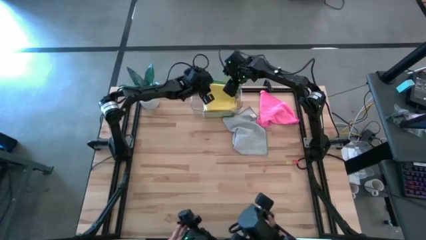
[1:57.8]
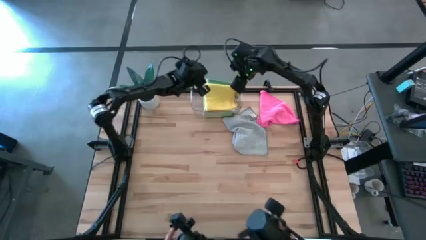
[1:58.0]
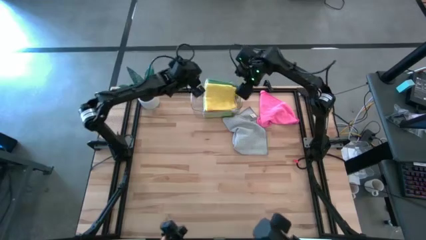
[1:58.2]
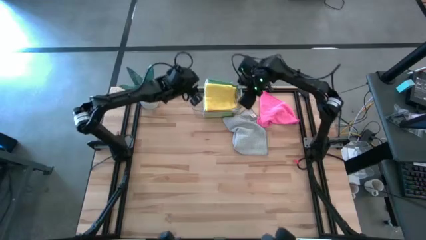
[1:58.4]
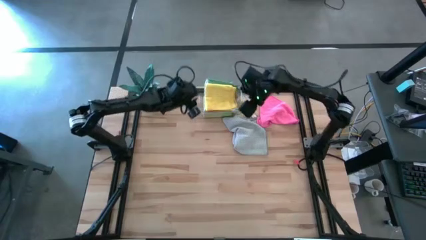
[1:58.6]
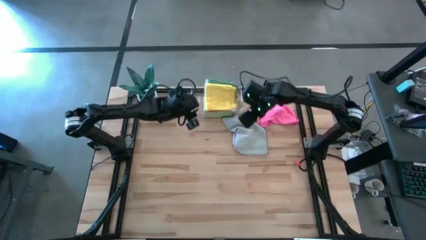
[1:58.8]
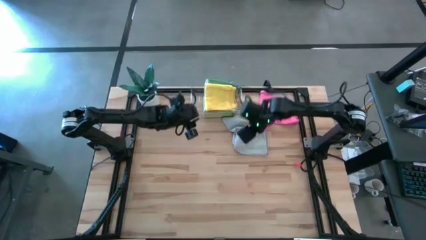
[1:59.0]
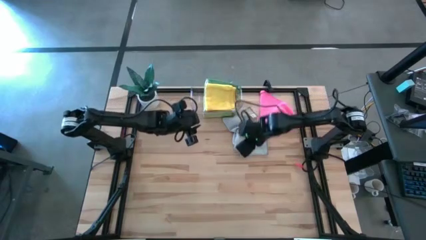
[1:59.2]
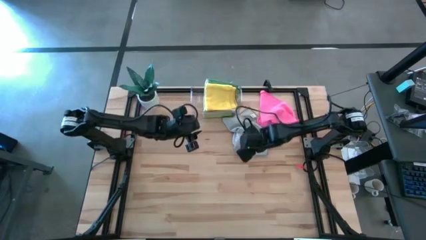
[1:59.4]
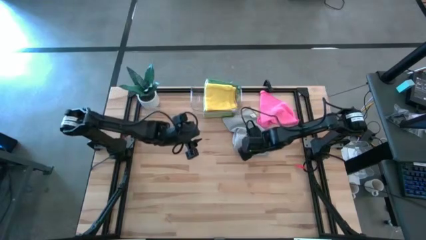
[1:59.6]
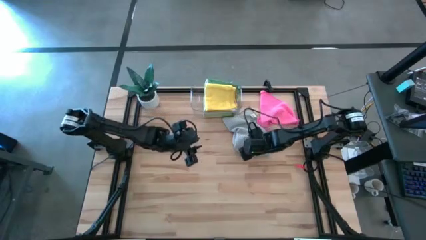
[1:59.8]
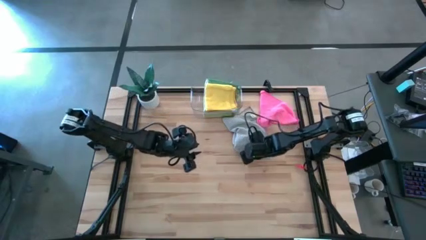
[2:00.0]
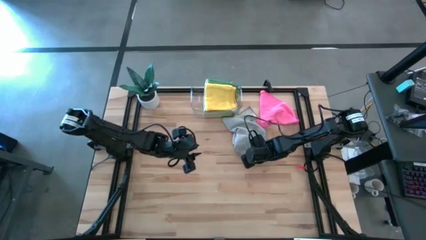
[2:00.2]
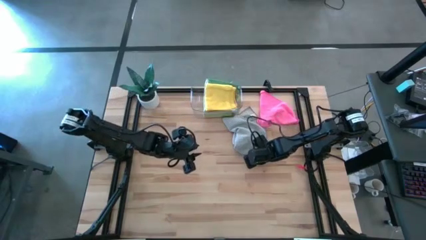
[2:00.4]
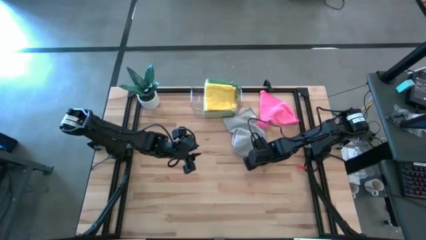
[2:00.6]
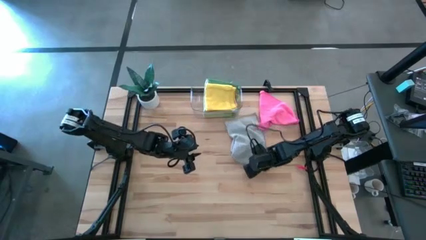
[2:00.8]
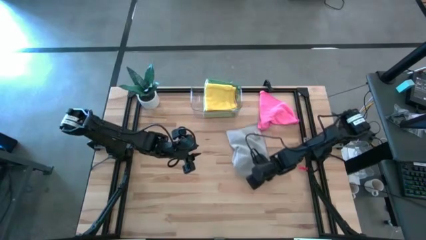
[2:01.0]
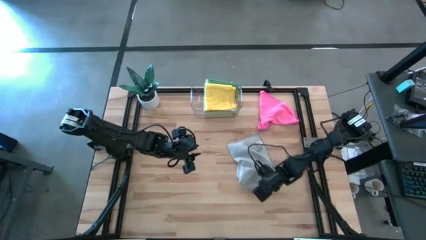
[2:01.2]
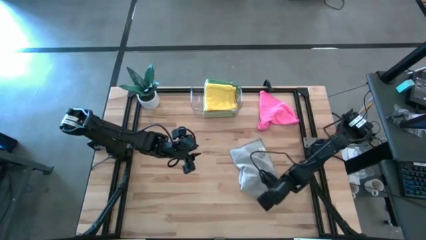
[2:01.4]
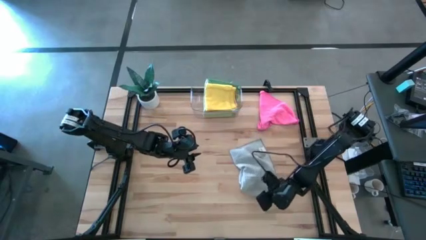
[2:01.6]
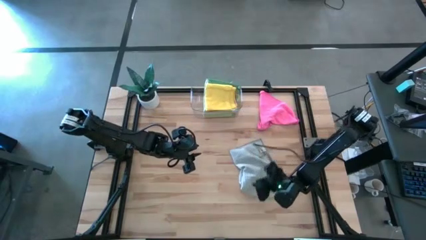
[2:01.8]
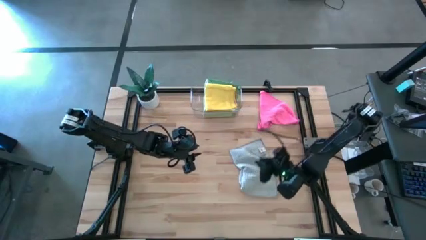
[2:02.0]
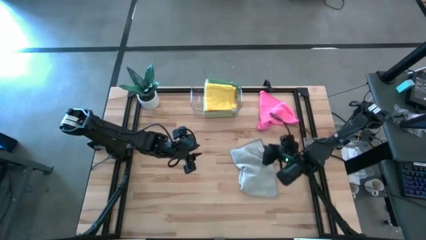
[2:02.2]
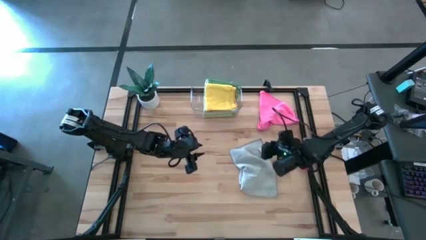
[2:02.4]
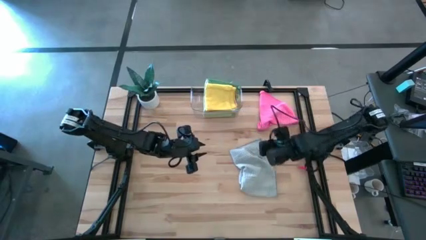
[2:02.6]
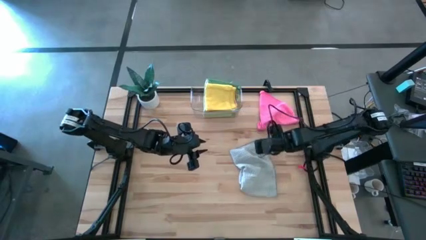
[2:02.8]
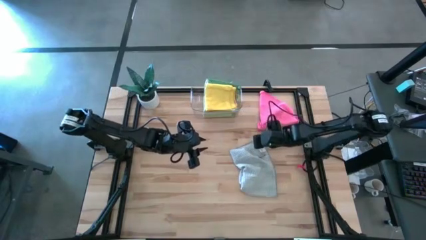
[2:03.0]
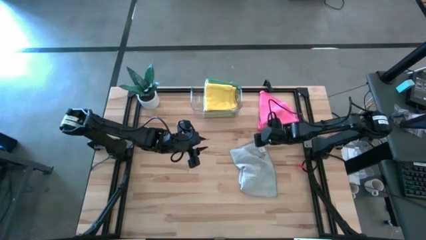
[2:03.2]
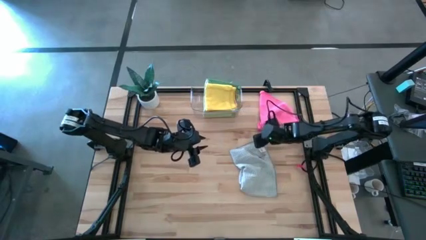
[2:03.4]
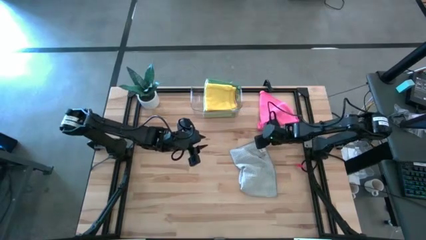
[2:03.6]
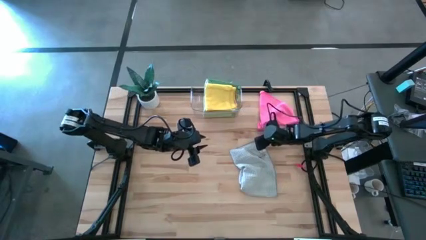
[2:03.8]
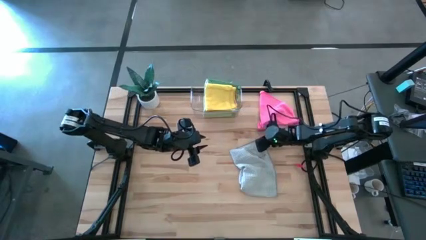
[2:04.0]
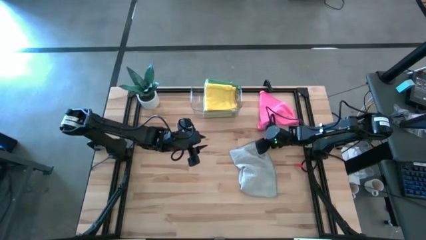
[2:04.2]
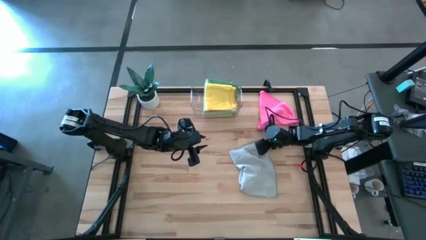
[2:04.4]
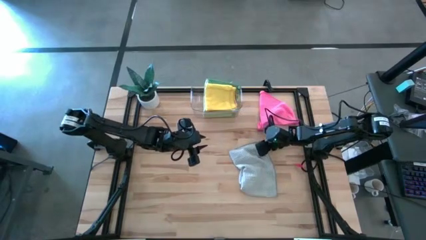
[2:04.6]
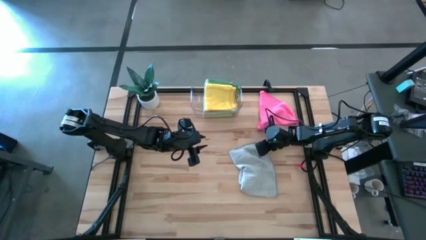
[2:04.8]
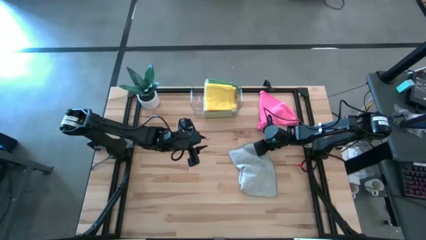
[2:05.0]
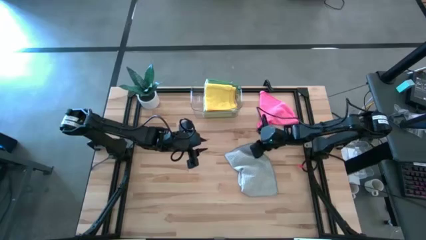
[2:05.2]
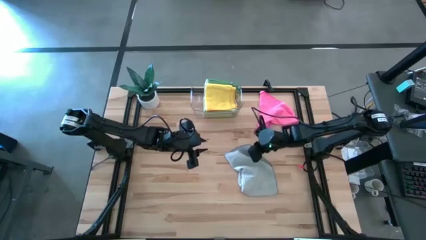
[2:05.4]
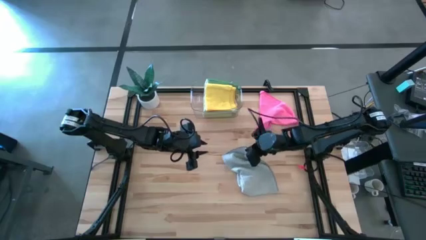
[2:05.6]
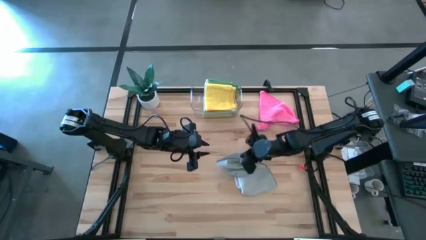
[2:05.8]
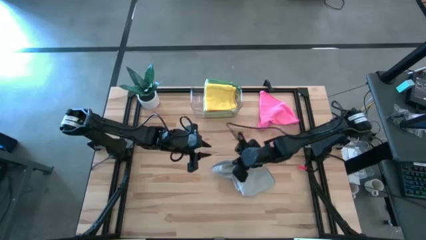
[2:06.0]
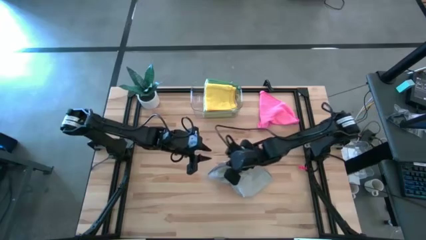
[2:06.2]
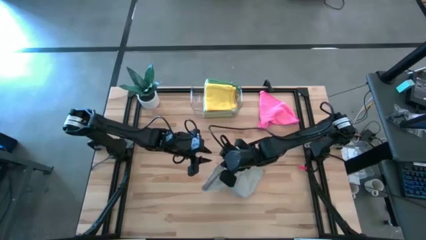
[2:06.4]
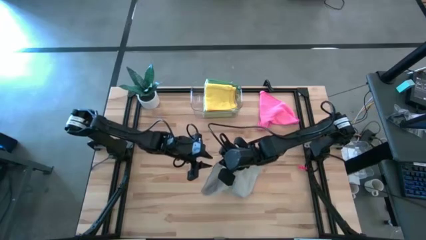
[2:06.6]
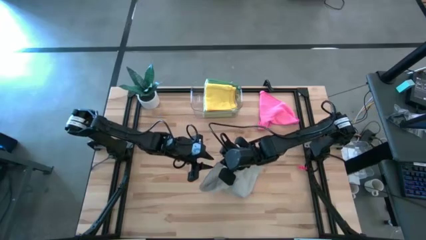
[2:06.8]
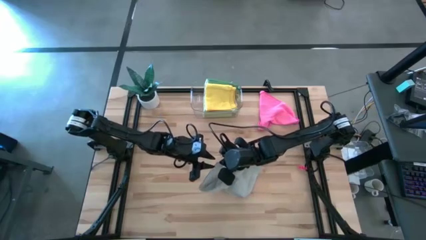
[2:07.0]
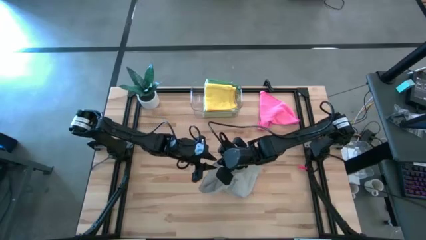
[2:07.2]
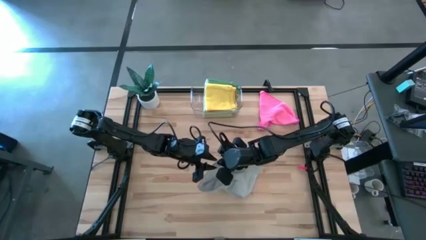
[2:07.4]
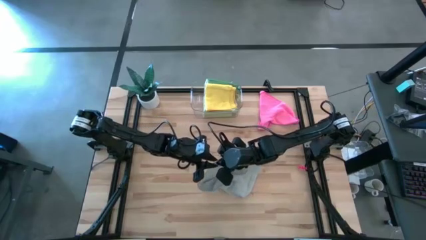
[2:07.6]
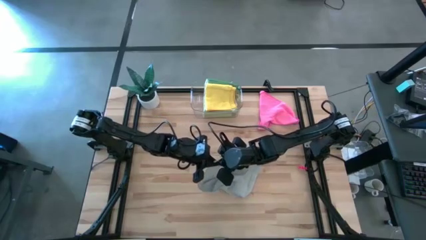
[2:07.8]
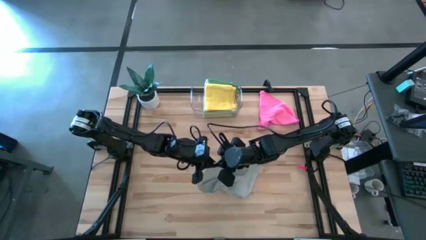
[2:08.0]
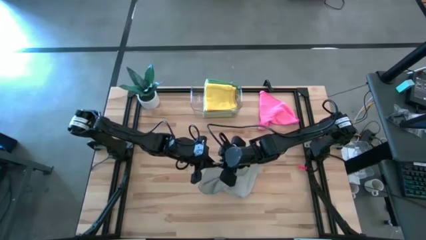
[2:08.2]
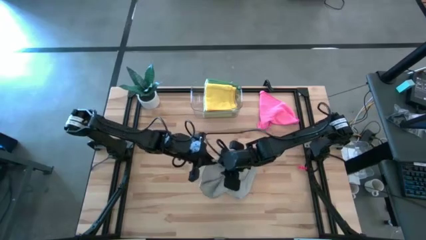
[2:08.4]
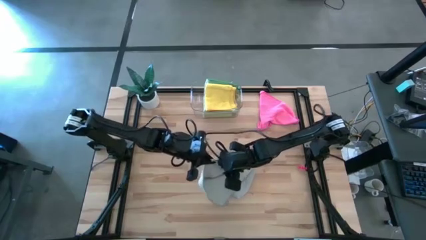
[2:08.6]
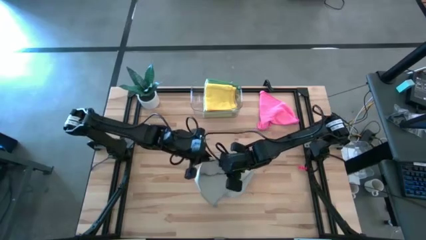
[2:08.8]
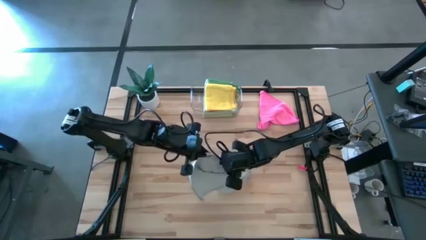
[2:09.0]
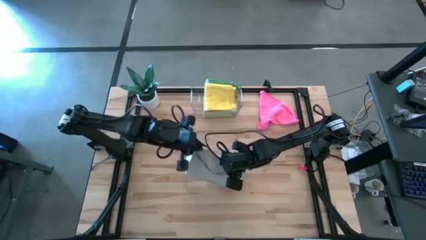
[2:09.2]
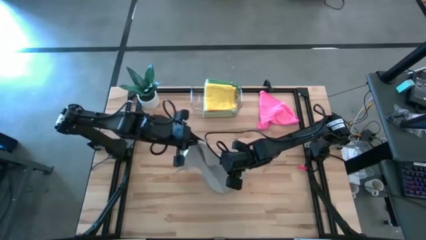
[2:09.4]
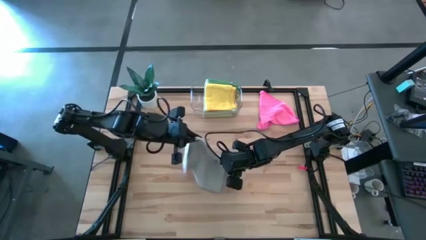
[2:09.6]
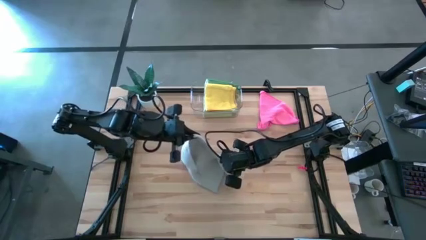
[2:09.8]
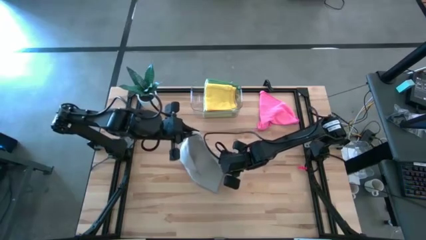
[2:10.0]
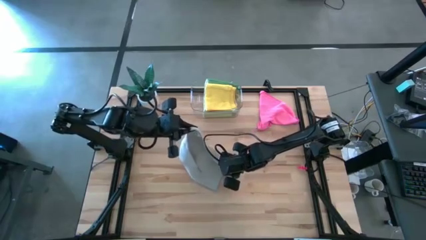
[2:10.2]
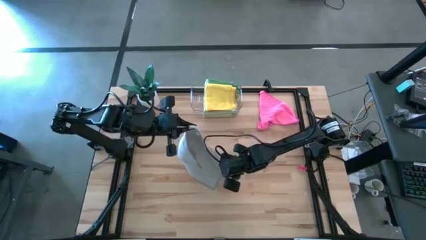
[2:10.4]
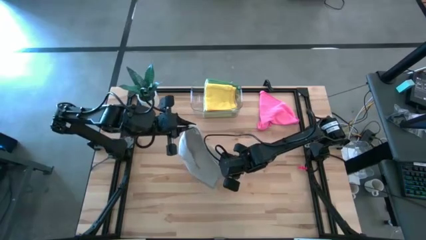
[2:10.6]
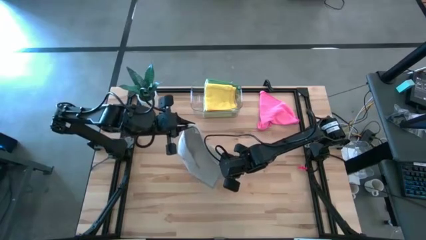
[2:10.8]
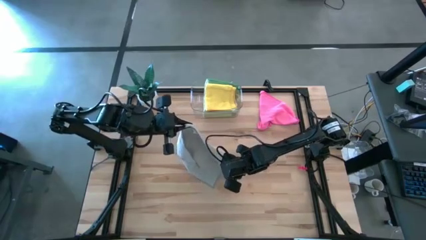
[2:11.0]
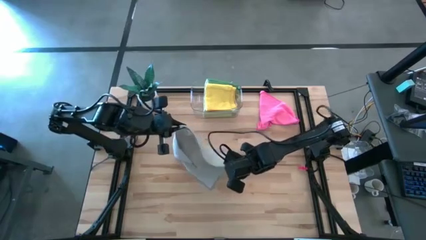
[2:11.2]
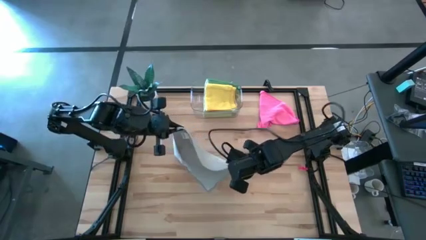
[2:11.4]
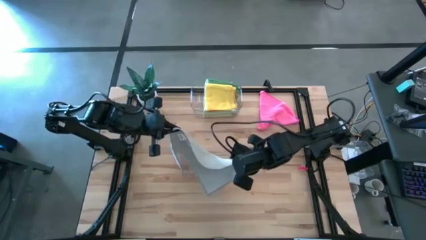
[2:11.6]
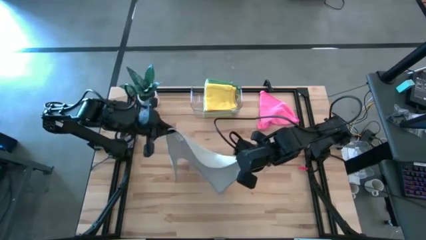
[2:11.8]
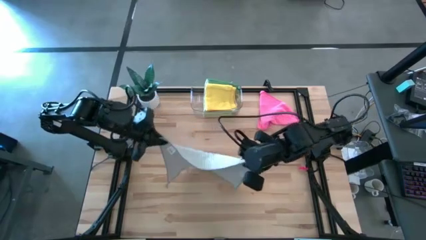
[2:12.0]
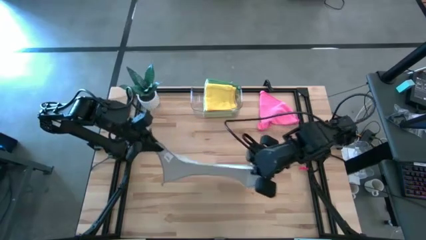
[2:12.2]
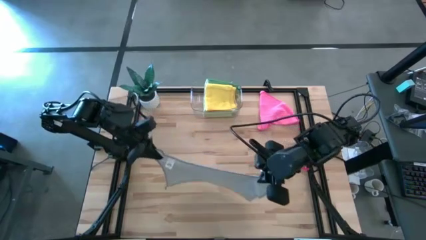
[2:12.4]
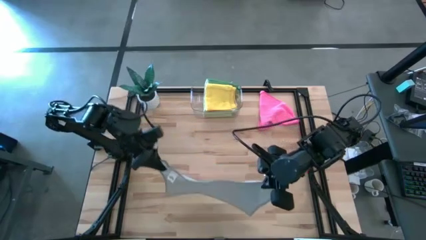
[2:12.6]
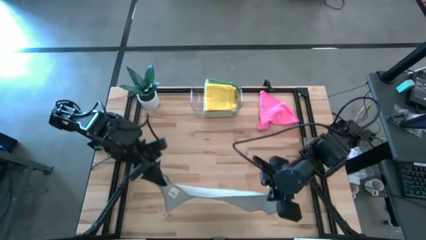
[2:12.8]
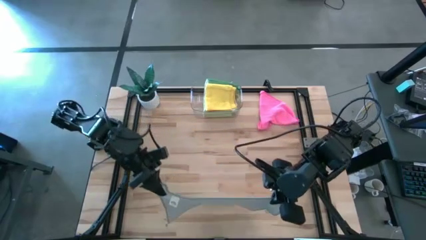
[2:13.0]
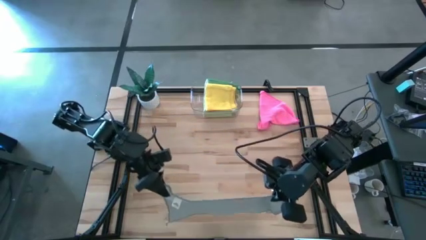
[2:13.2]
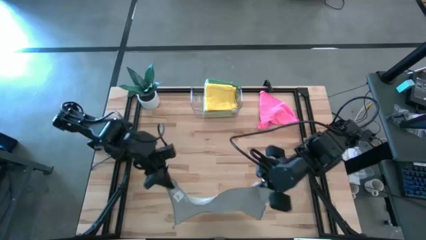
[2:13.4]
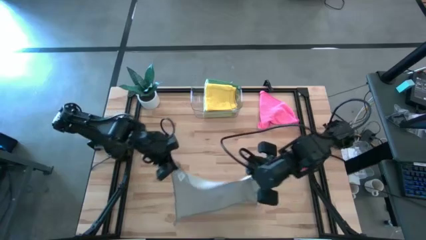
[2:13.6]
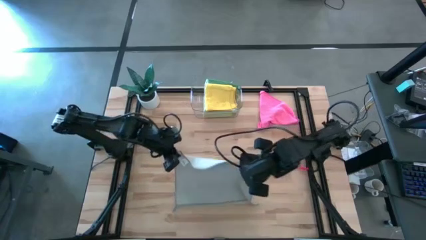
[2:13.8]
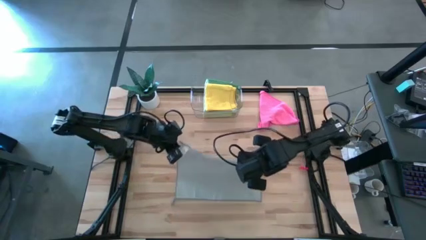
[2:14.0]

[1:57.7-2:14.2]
Task: Fold microfiber towels
Fold the gray microfiber cloth
